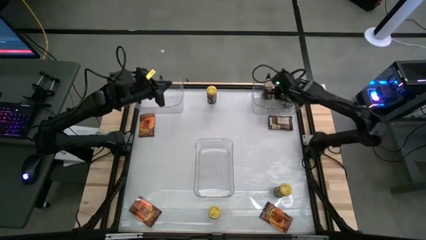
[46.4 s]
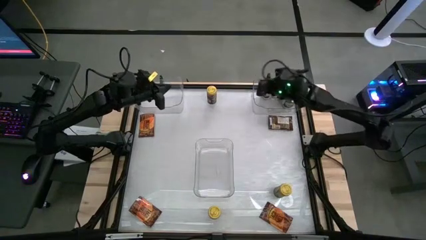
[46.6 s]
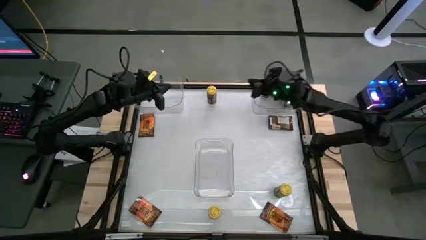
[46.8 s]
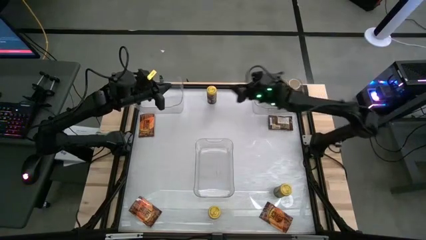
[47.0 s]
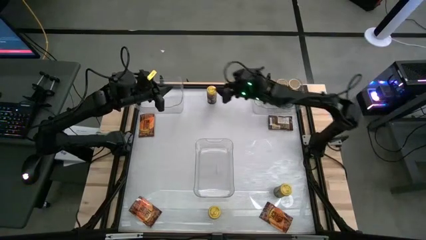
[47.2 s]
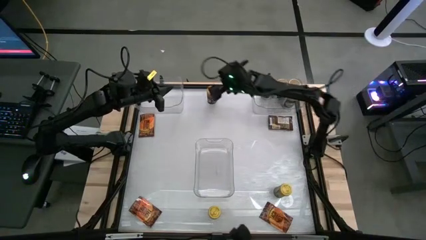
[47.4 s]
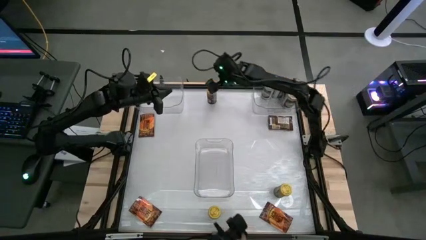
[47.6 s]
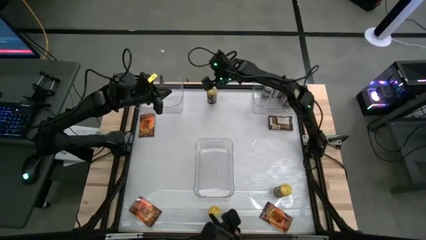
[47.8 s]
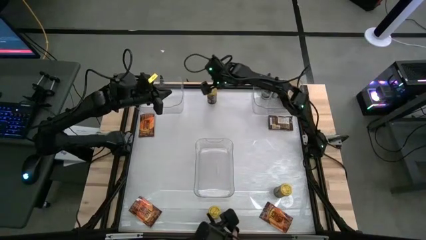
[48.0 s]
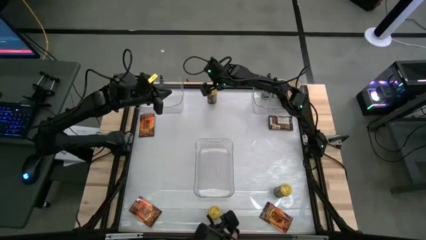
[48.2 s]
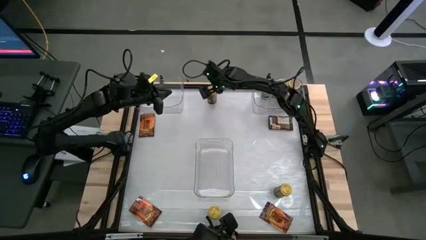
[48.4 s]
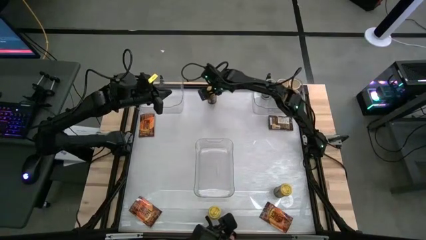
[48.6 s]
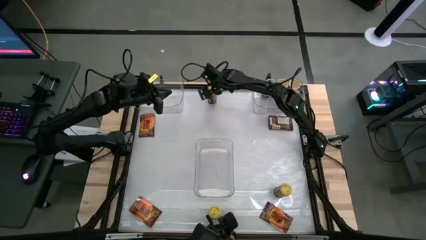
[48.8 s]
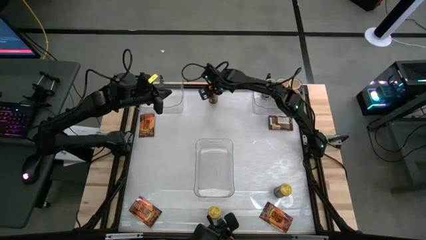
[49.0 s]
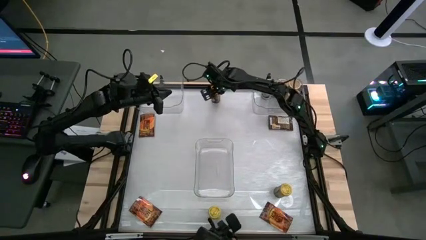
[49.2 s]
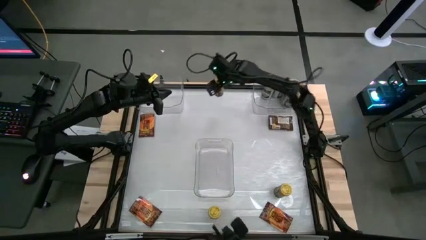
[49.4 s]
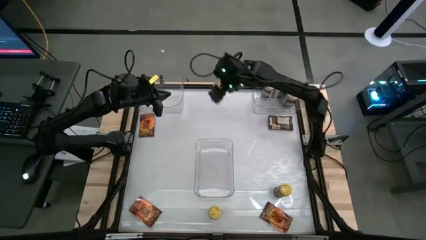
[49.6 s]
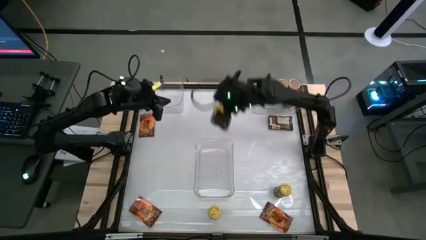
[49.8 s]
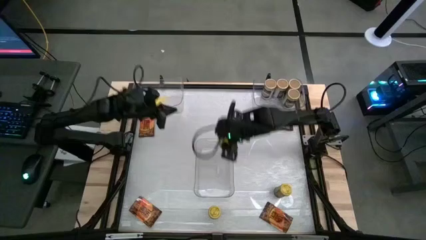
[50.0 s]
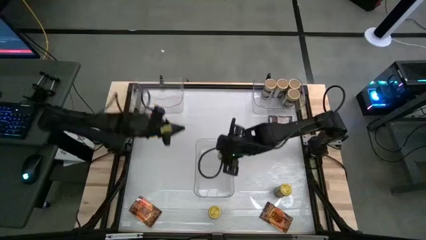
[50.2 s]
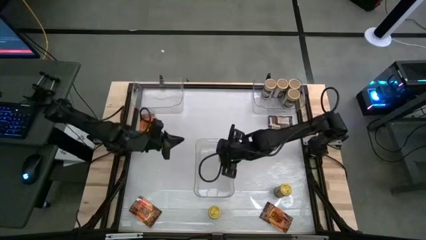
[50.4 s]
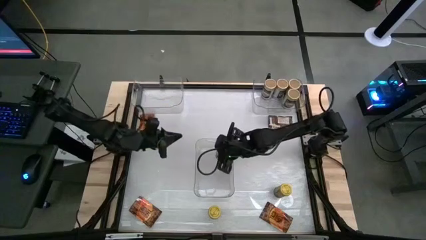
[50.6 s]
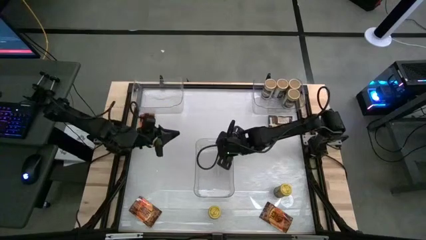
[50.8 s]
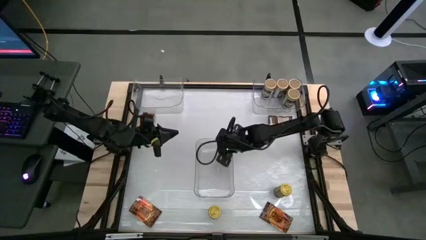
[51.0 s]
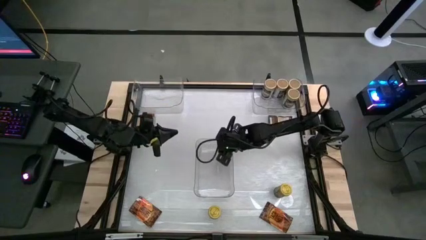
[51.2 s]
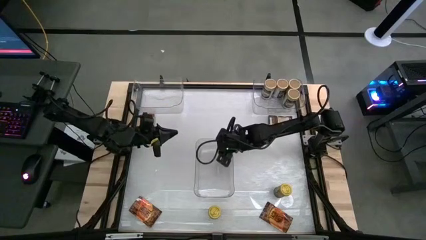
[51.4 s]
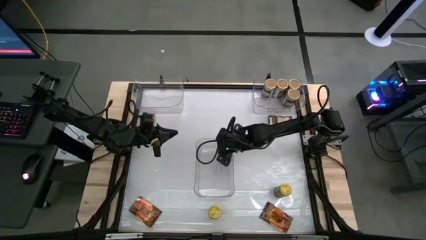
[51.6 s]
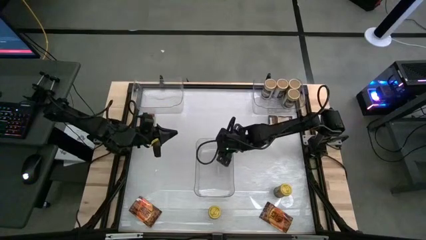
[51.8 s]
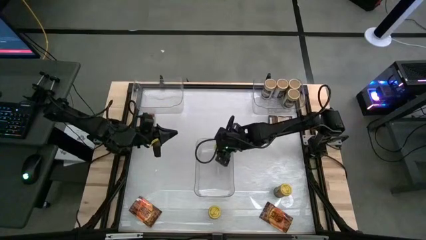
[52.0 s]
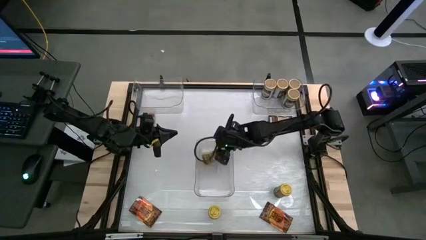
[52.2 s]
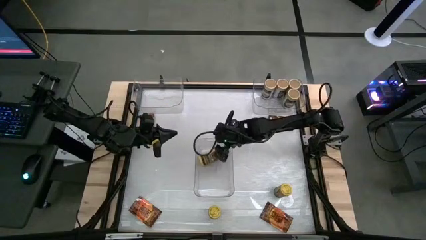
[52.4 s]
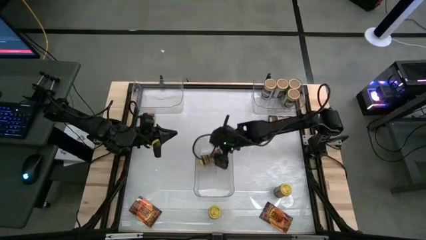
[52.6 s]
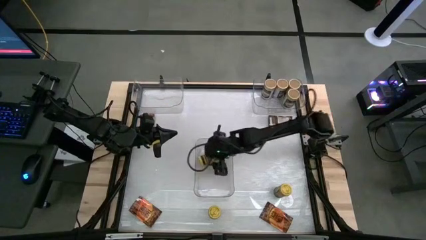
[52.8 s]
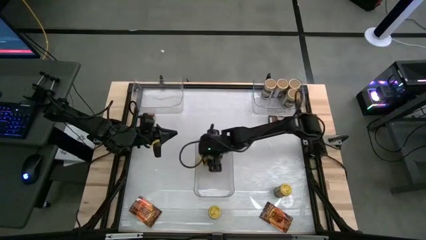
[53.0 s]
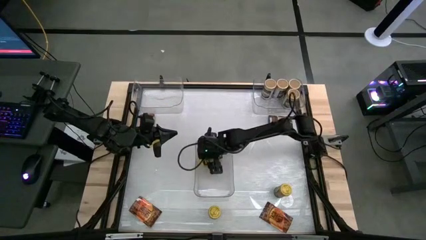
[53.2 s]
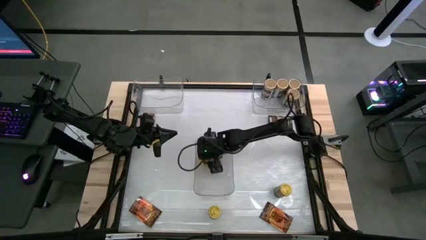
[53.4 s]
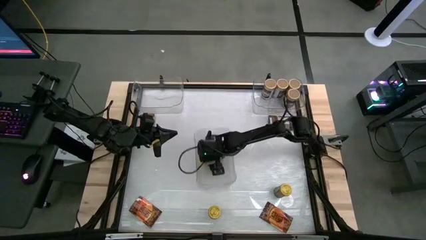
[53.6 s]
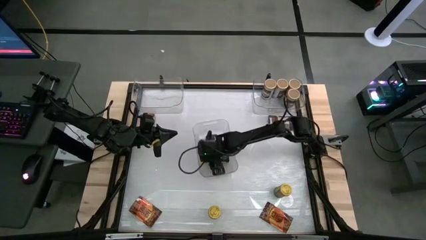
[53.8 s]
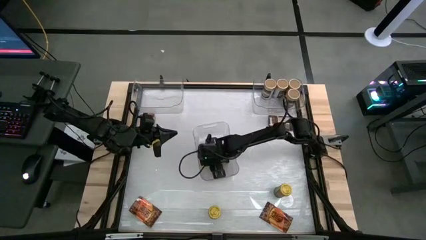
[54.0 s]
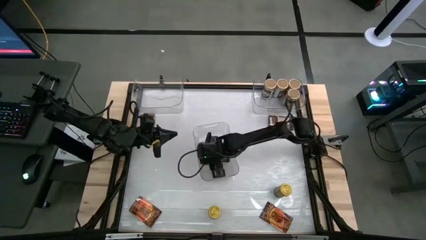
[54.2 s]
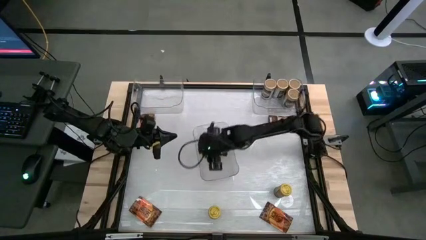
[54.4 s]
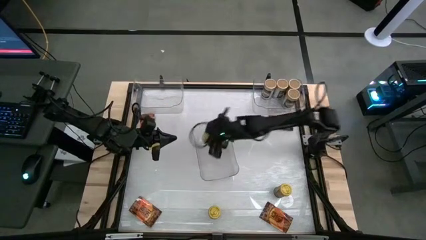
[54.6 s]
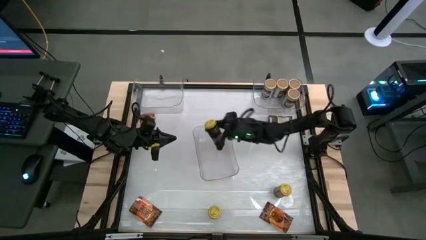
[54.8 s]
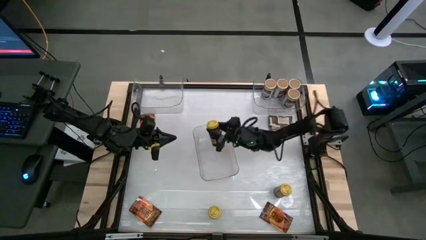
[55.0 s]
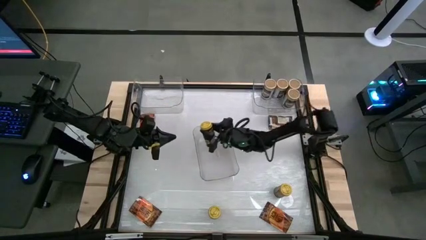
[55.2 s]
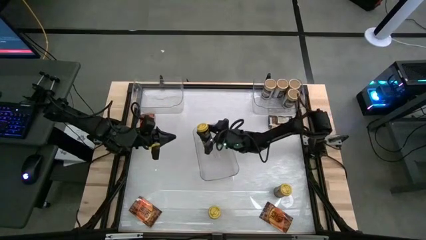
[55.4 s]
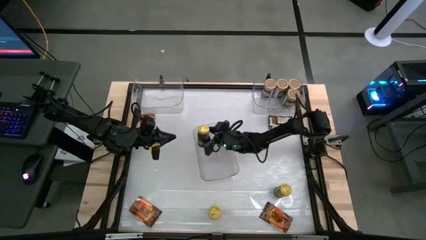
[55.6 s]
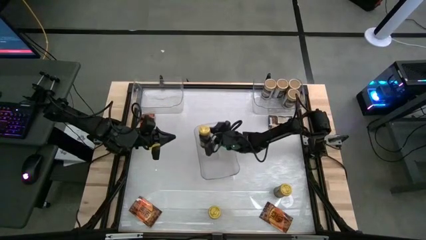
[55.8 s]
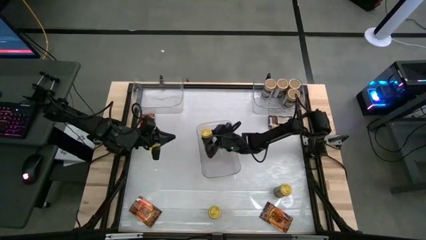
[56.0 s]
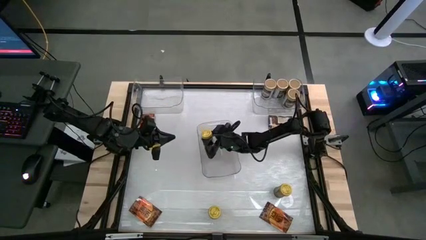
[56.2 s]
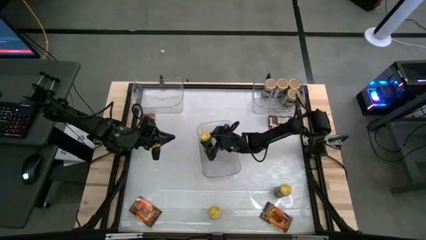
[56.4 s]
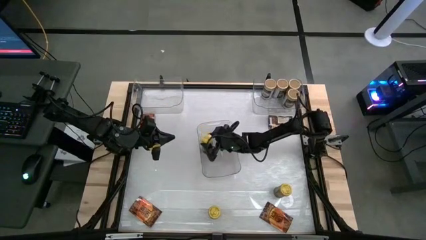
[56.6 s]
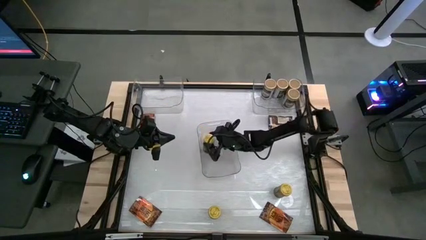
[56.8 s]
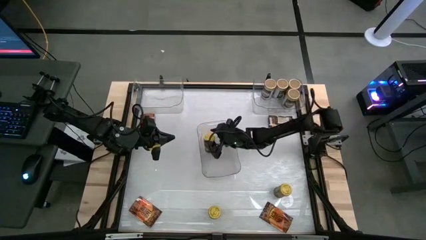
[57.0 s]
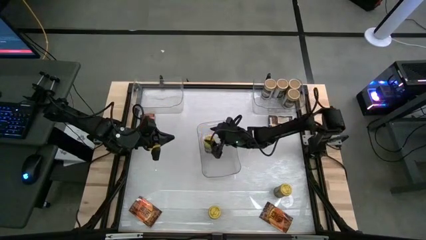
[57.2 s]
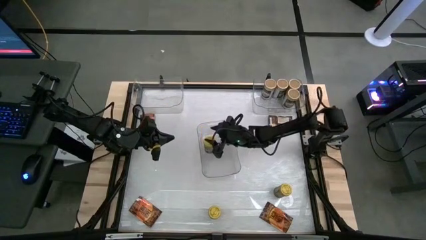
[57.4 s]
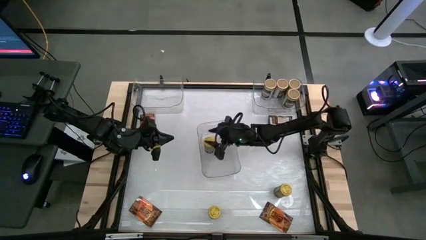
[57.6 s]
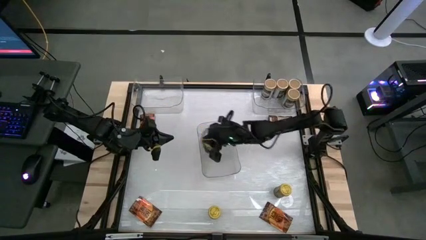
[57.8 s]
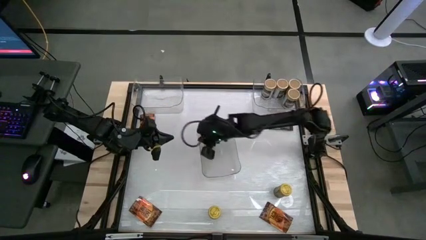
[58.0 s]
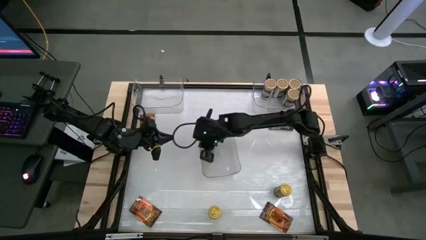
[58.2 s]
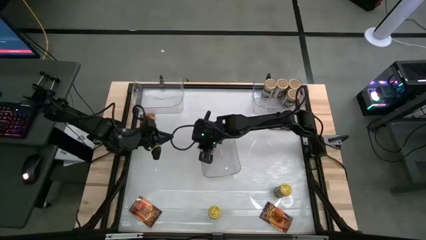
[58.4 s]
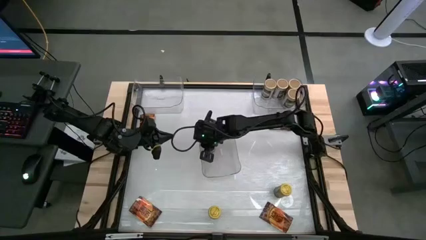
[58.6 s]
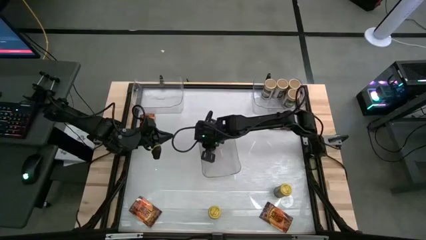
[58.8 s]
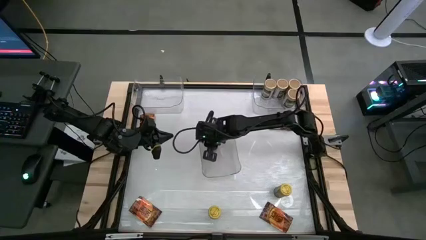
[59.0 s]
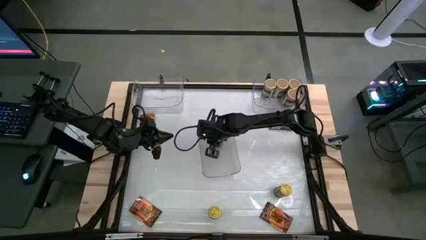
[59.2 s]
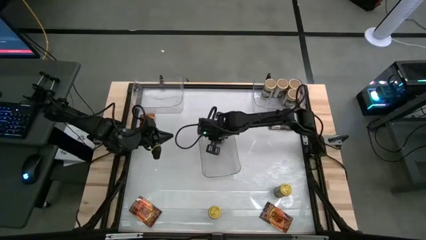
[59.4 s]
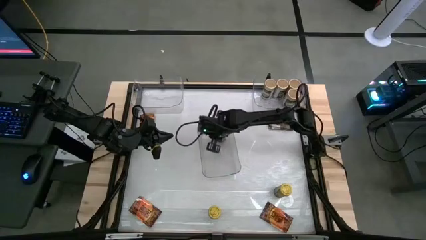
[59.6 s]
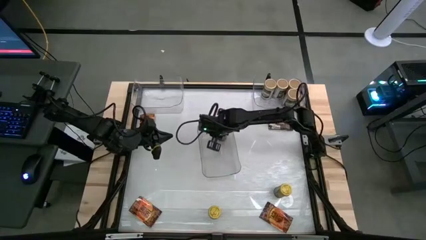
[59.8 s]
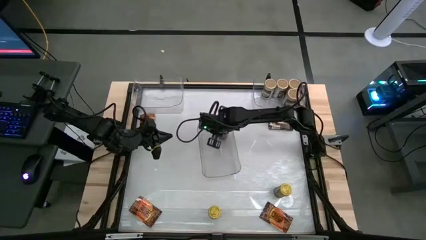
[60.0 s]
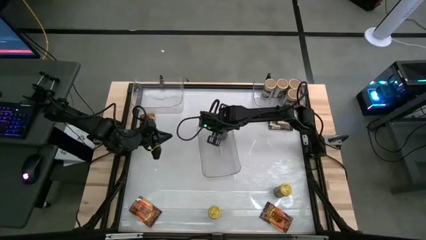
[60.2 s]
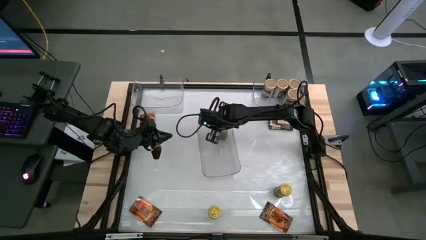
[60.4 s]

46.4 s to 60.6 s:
Task: Sort spices by type
Put the top center yellow seasoning bottle into the bottom transparent bin

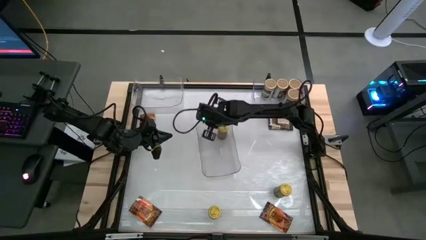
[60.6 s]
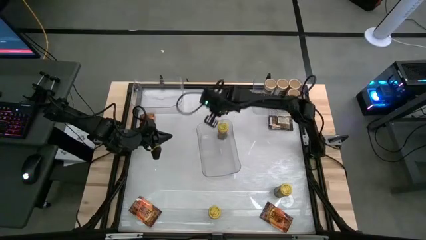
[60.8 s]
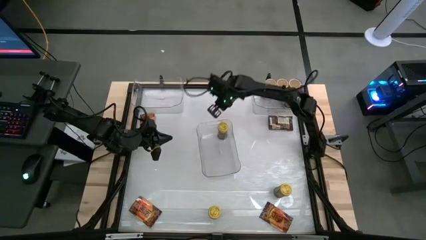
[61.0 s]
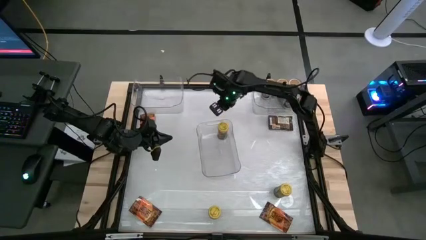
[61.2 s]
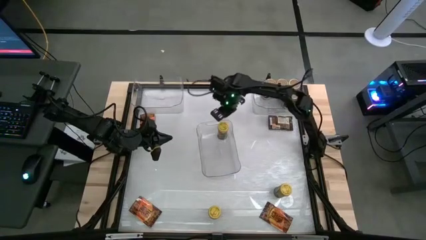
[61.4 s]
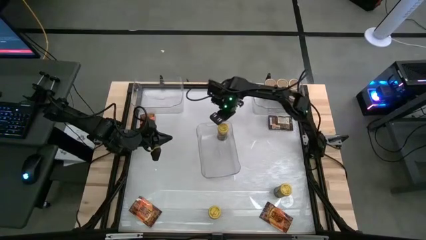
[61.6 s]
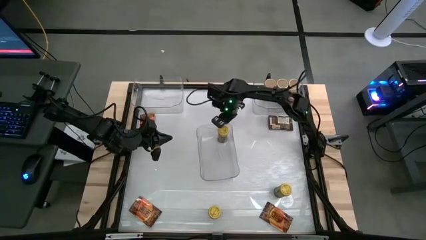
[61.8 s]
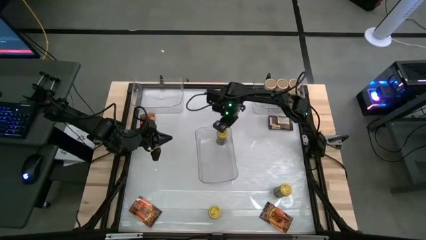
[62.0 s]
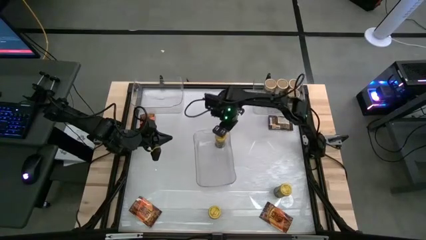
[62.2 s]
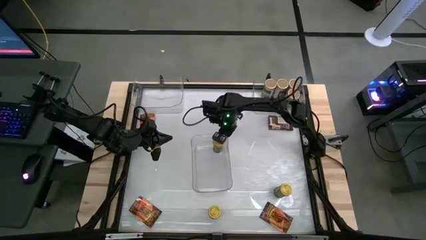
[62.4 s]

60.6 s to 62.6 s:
Adjust the bottom transparent bin

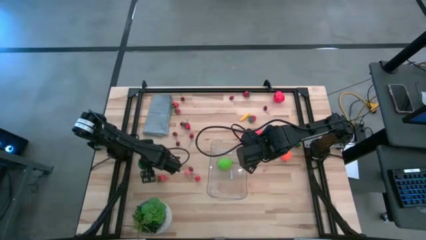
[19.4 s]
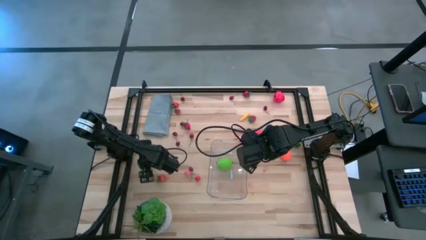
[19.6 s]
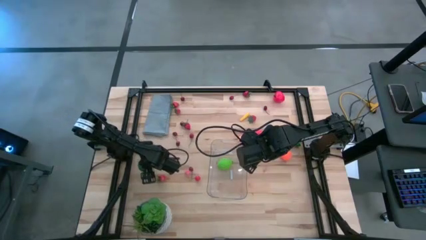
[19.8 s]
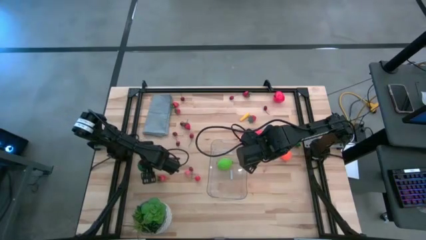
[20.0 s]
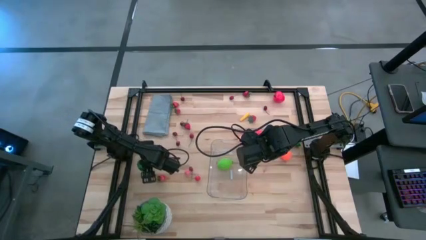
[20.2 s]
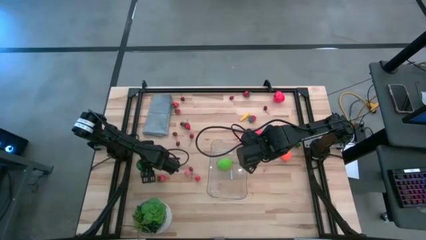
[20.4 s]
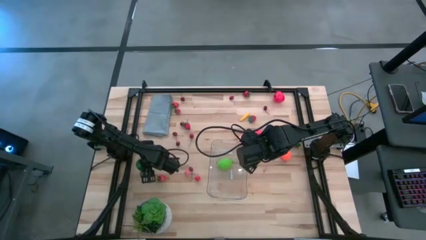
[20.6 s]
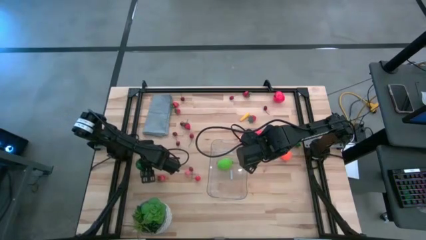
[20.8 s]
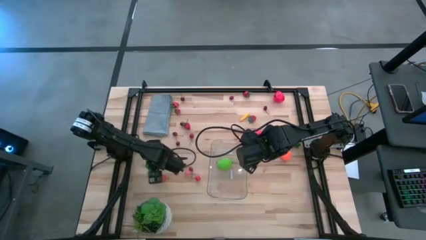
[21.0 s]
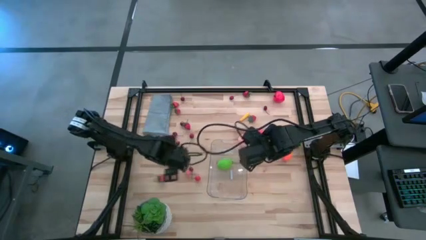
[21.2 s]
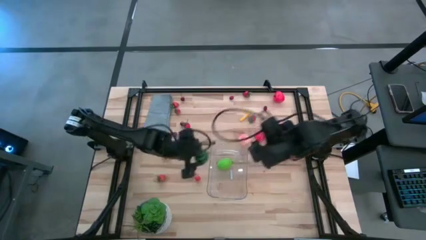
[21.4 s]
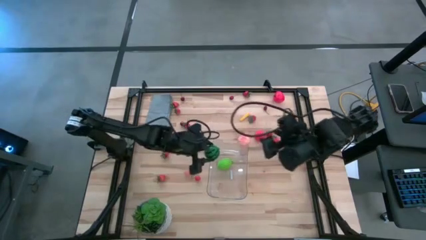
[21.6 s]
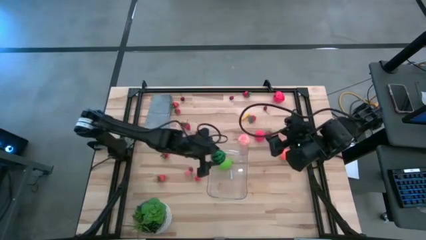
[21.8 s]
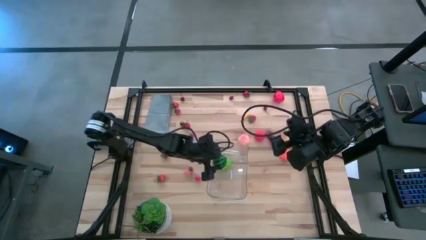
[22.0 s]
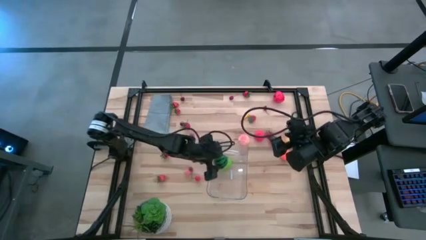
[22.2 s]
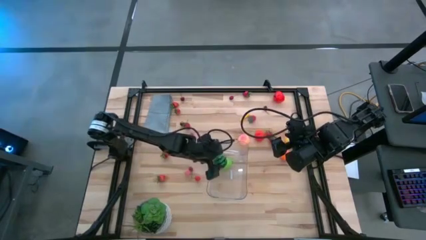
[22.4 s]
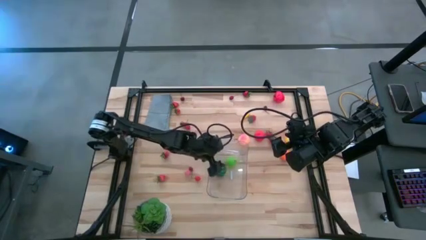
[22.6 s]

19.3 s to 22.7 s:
Task: Pick and placing Produce into tupperware
Put the watermelon into the transparent bin
